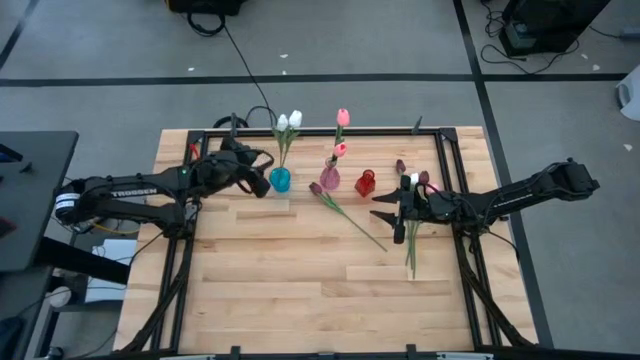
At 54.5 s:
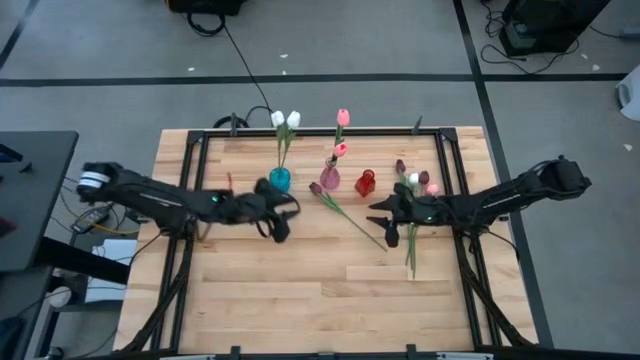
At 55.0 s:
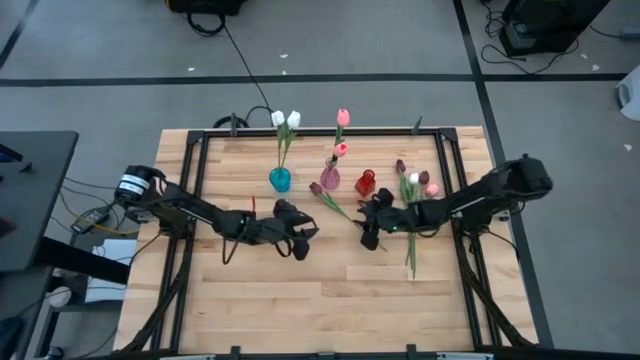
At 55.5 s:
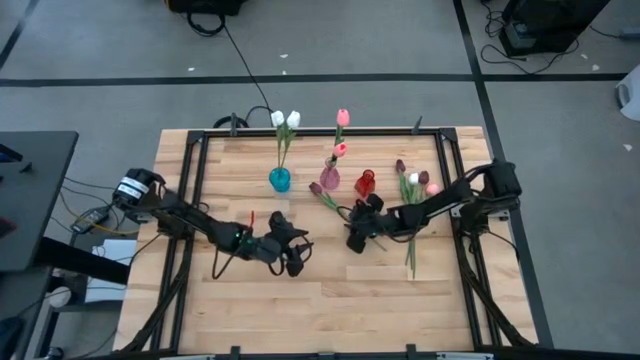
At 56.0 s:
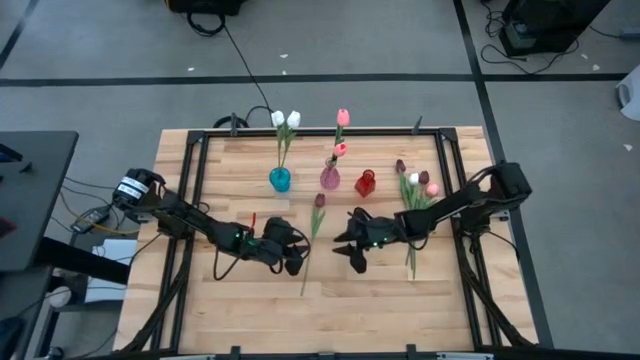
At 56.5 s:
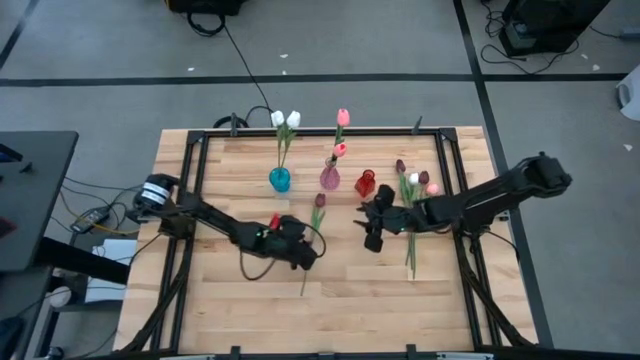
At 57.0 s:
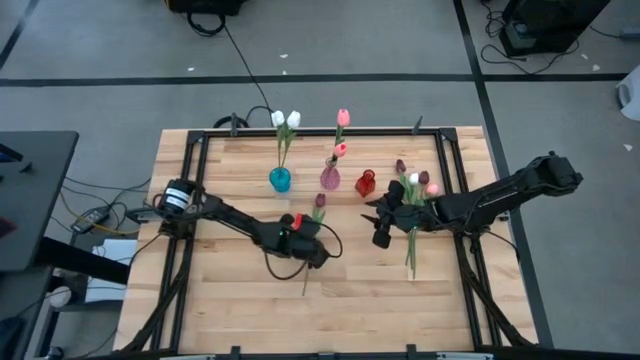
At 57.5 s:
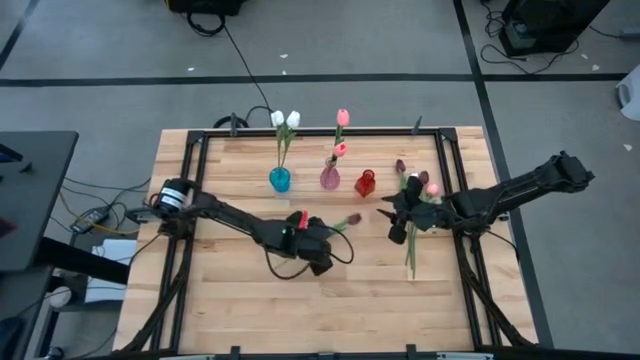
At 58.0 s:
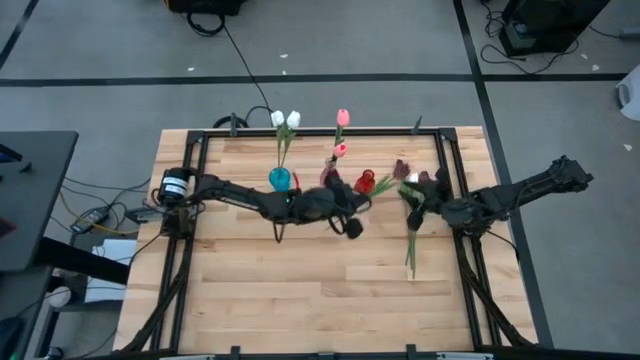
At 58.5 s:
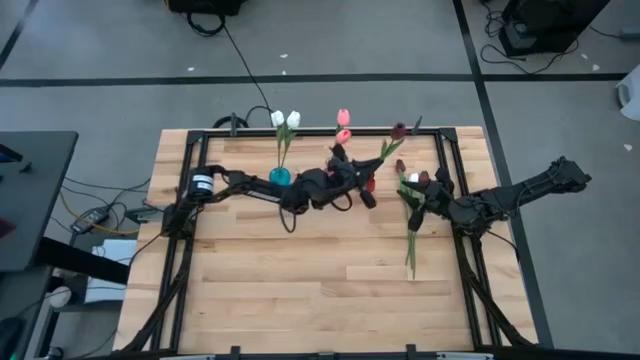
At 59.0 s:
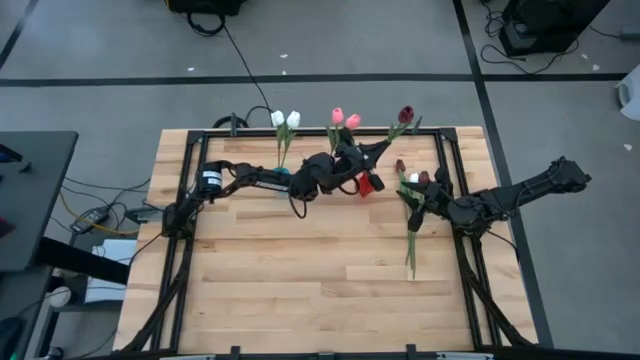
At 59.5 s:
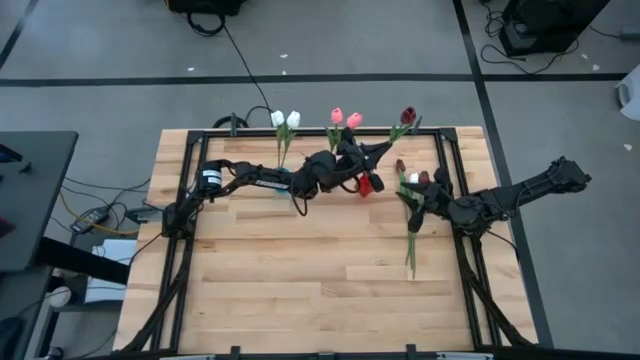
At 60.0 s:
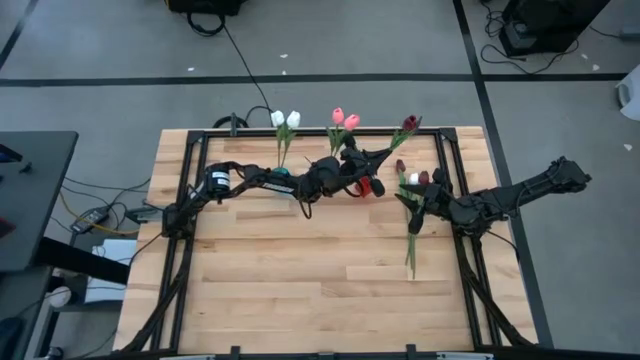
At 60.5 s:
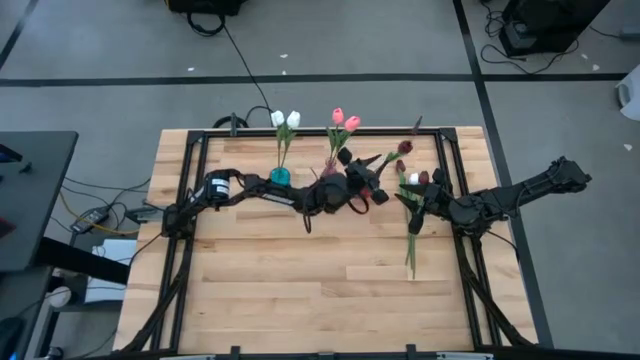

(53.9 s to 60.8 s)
Task: Sort flowers into vase by color
Put the left red tulip into the red vase

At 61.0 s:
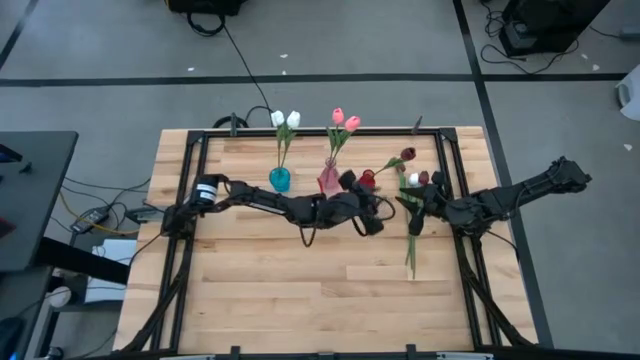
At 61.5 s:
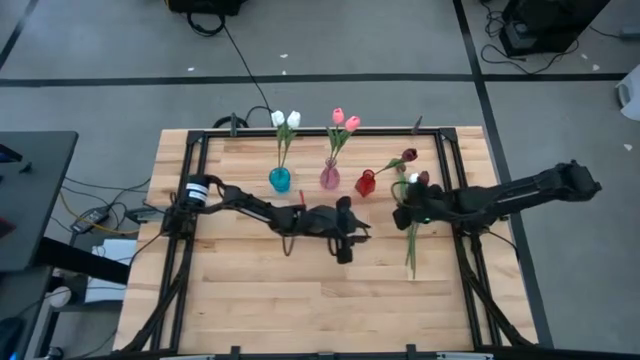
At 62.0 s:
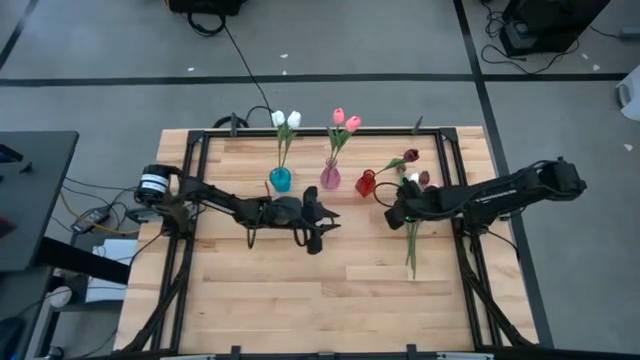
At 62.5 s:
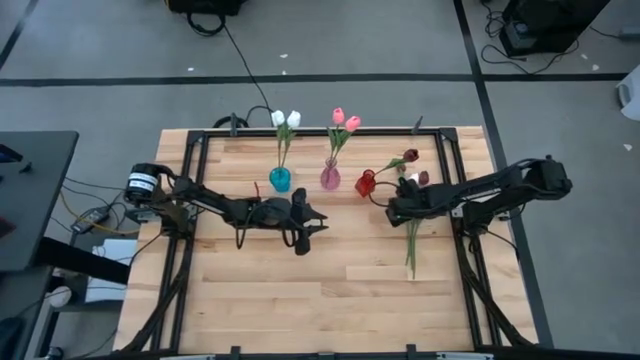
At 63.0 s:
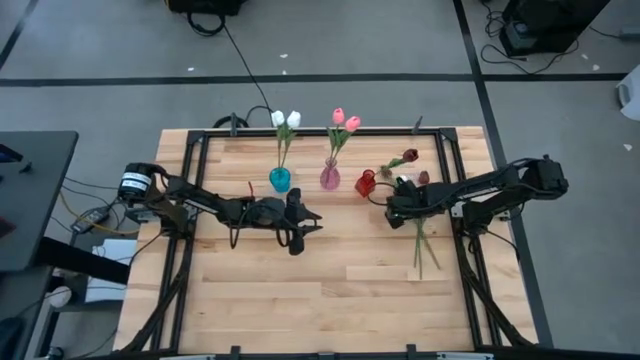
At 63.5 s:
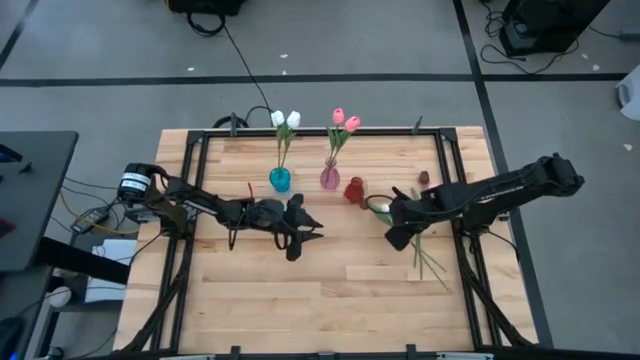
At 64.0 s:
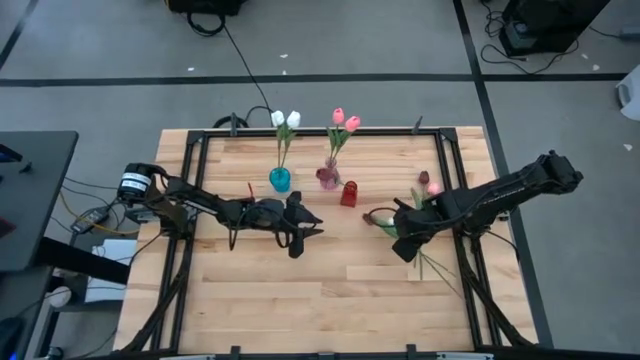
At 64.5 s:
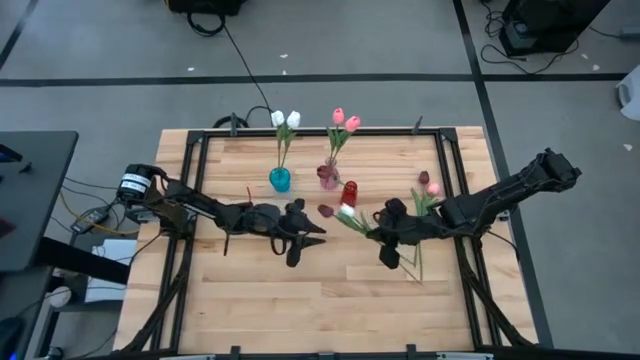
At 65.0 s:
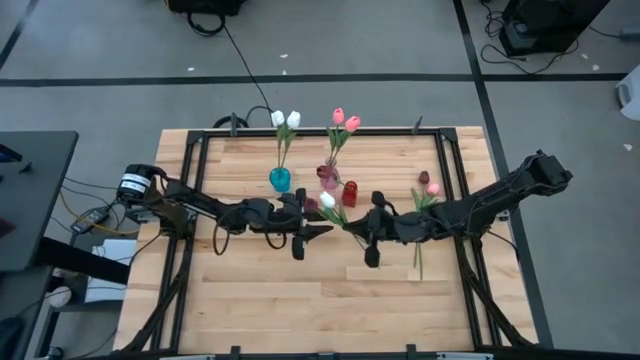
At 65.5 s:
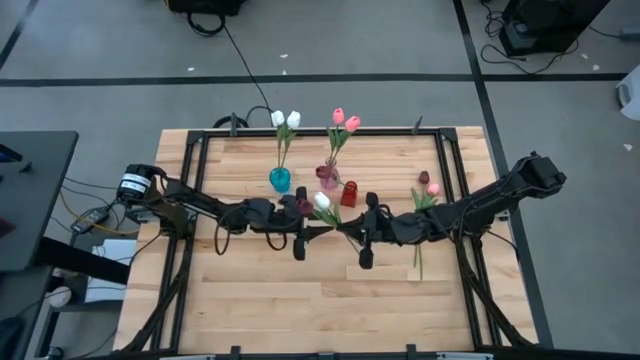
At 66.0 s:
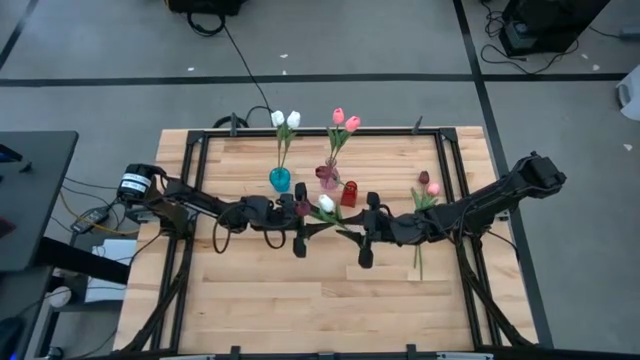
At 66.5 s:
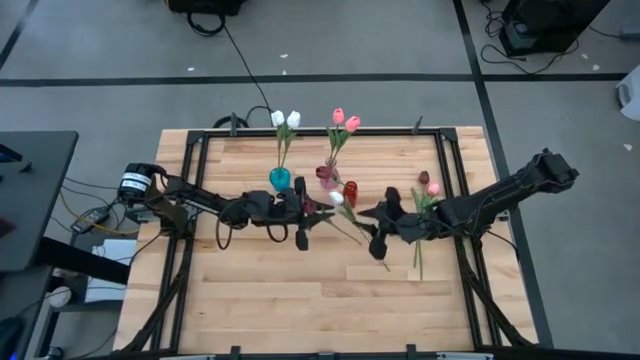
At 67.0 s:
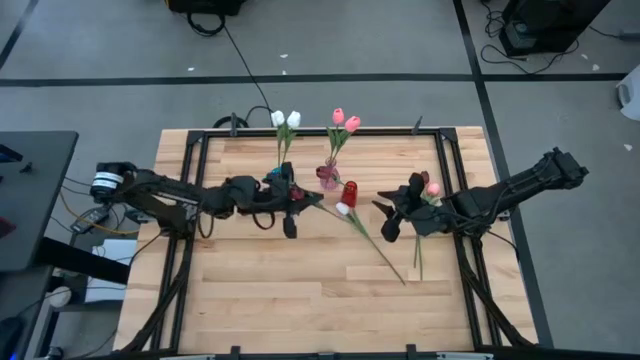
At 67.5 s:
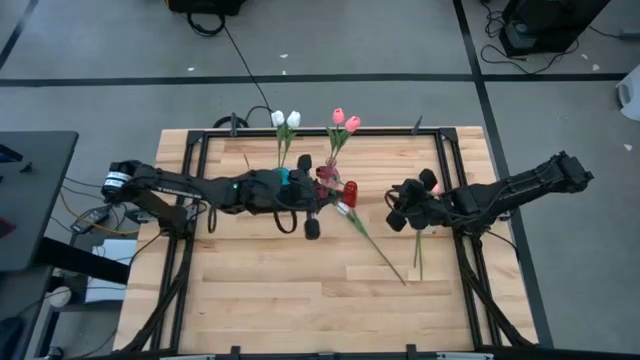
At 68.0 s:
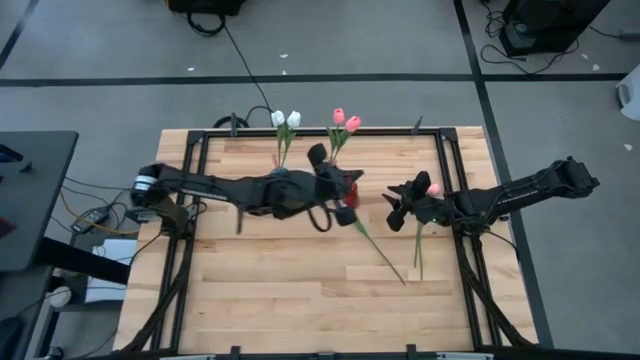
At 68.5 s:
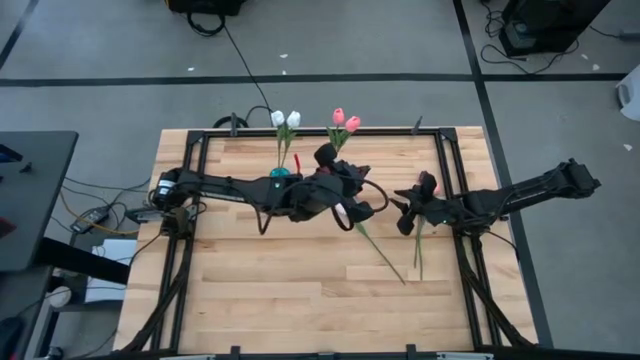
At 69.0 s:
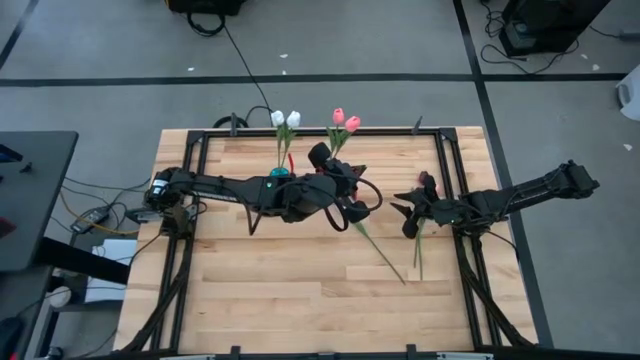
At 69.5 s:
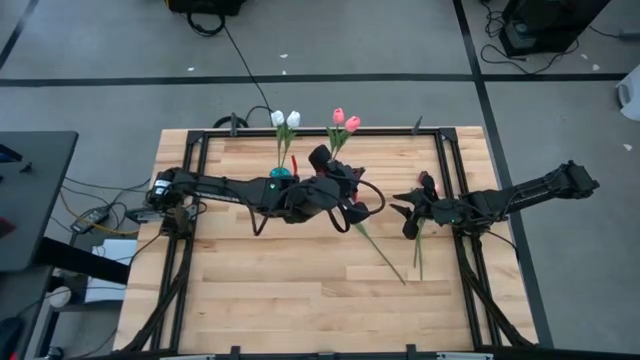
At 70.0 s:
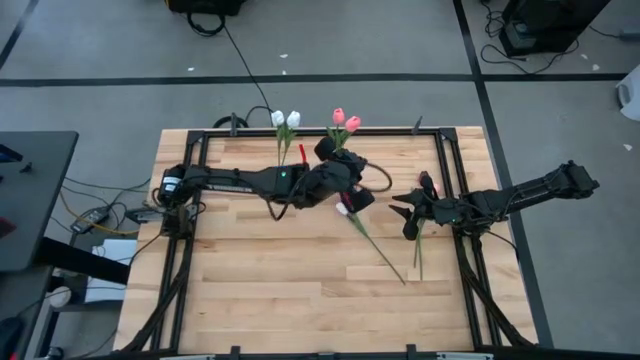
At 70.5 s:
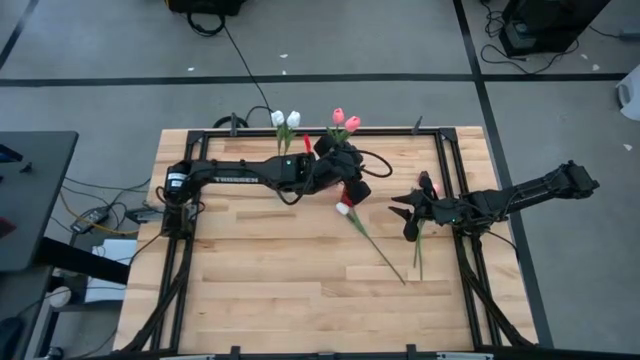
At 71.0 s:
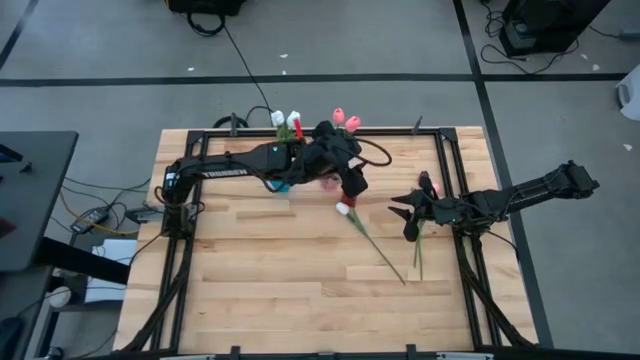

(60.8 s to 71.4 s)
Put the left red tulip into the red vase

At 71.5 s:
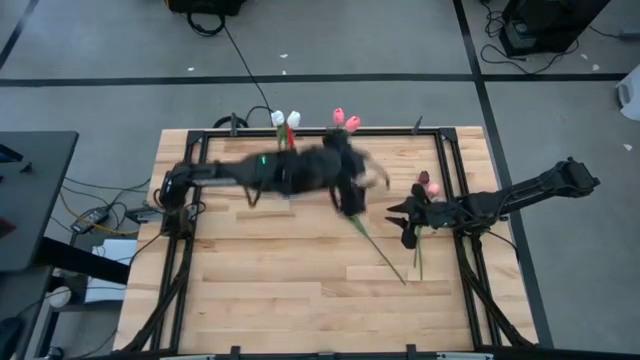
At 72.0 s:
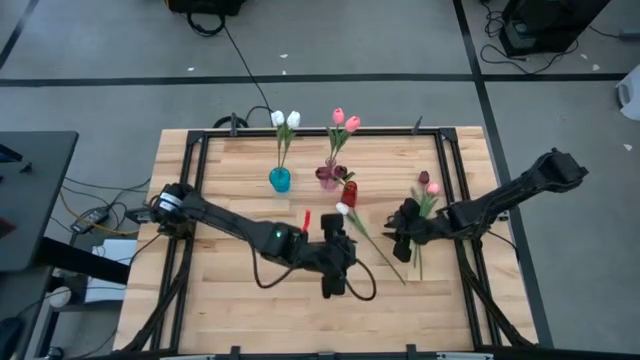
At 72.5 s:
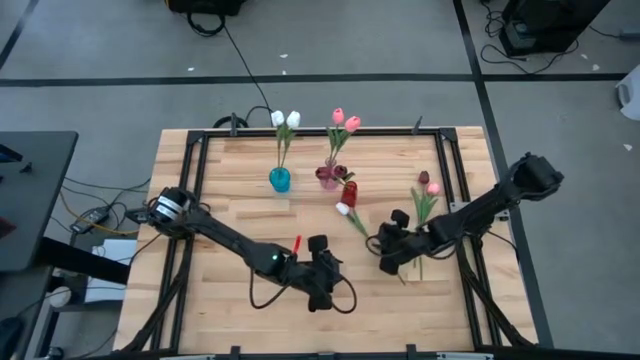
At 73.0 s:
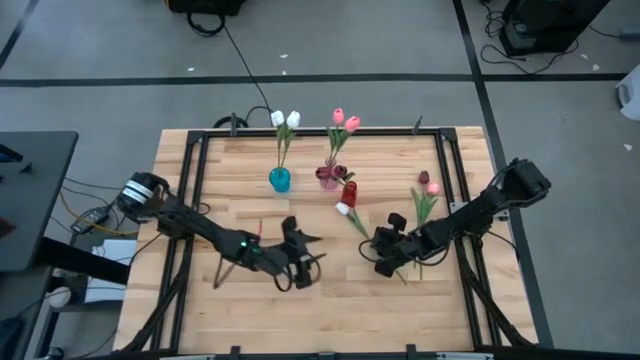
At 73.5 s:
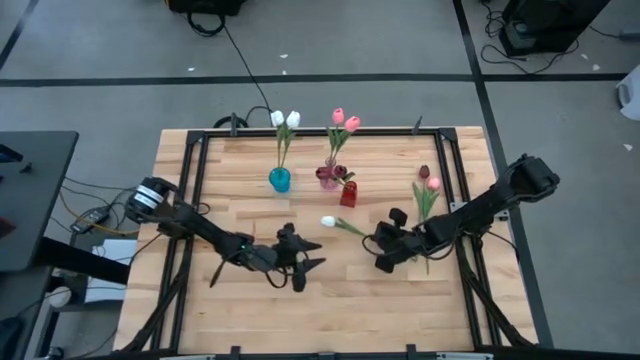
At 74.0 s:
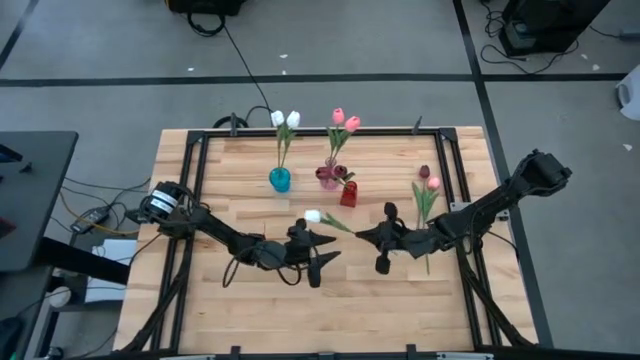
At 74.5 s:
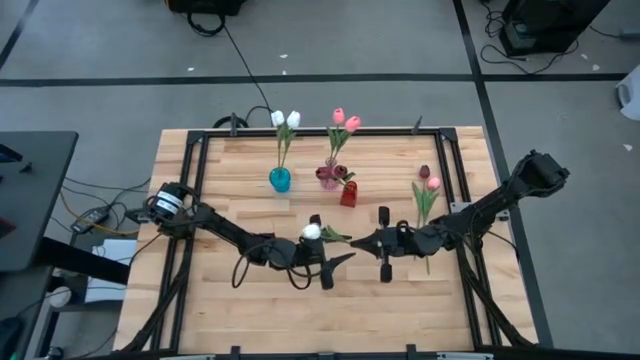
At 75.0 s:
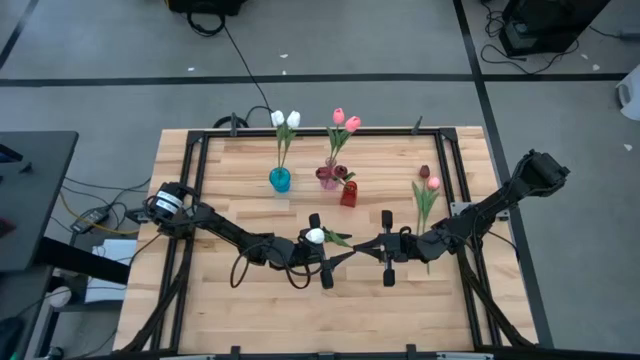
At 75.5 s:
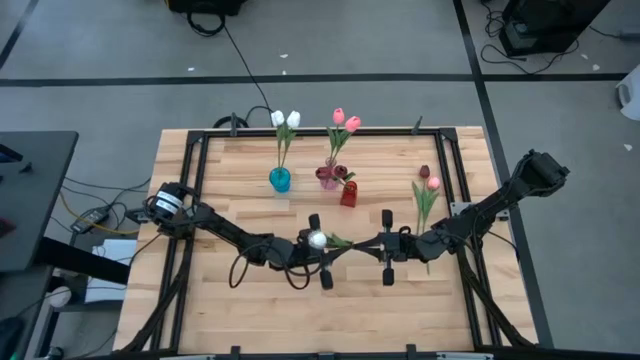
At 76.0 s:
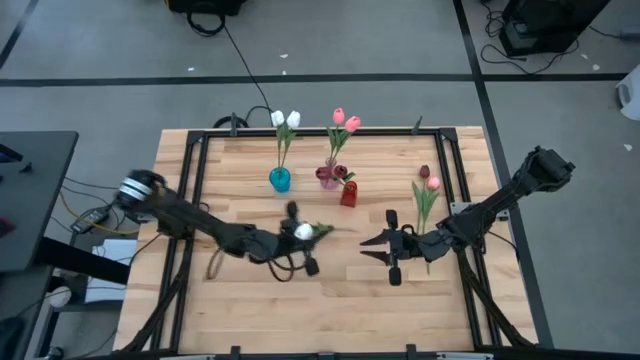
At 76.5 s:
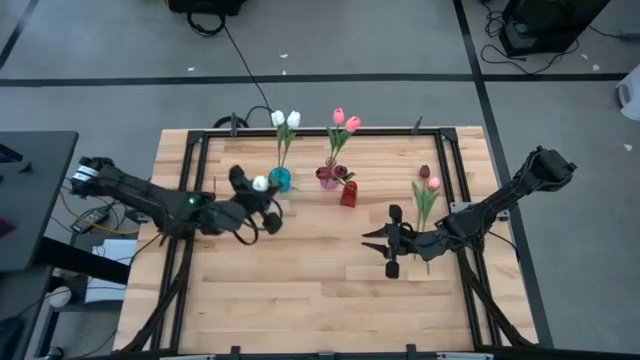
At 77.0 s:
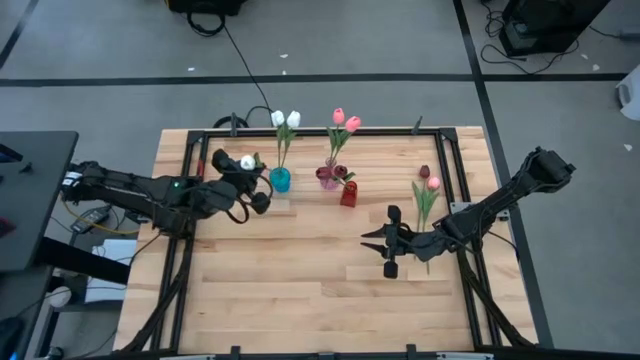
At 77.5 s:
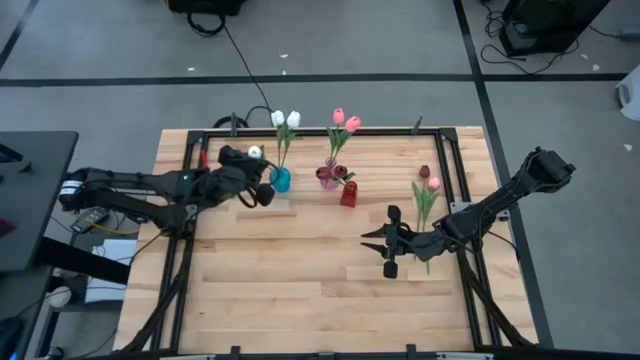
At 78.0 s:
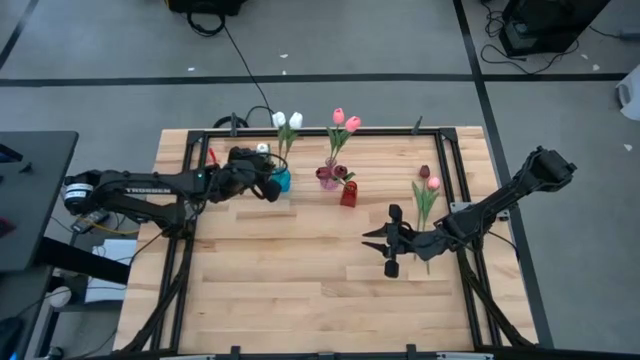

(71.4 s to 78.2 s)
Put the white tulip into the blue vase
